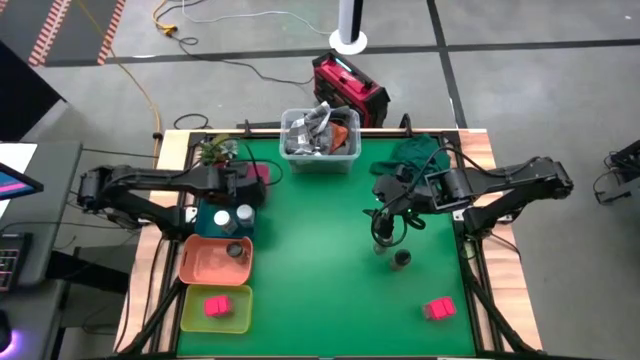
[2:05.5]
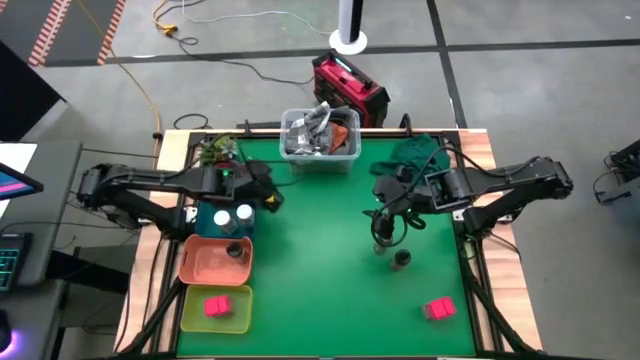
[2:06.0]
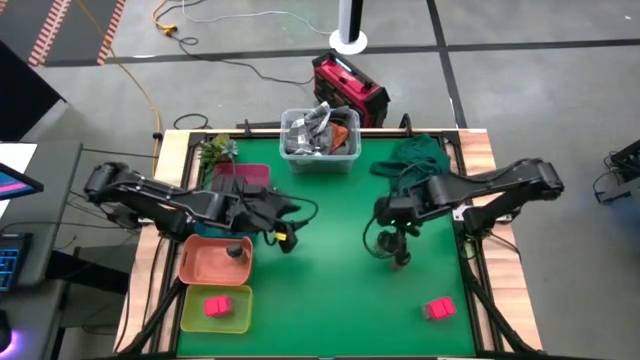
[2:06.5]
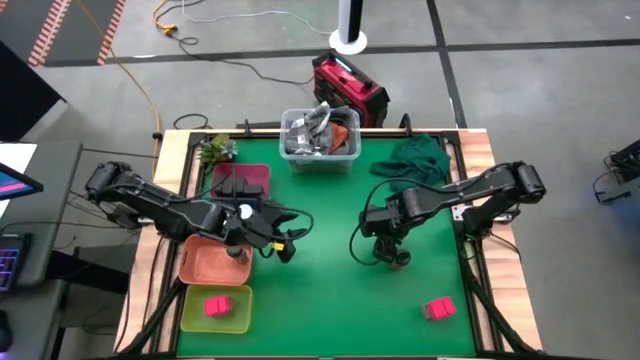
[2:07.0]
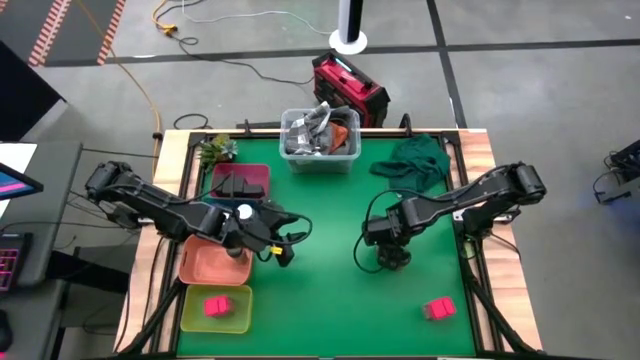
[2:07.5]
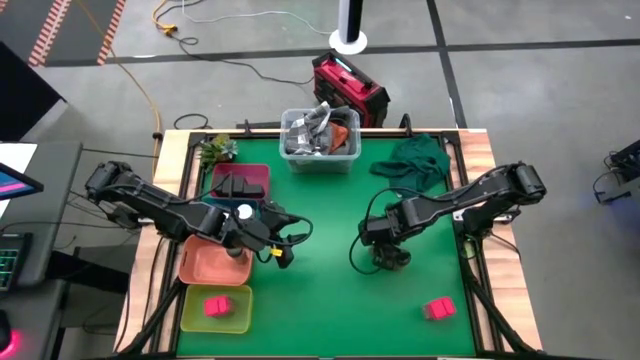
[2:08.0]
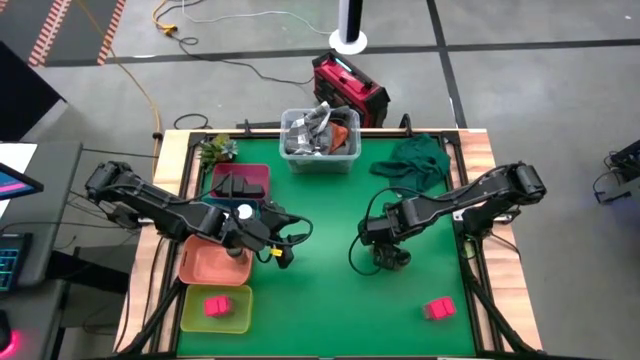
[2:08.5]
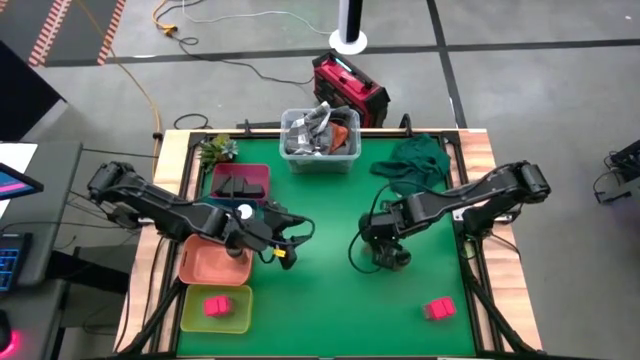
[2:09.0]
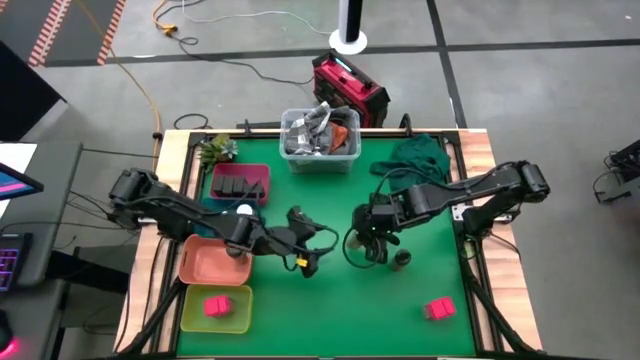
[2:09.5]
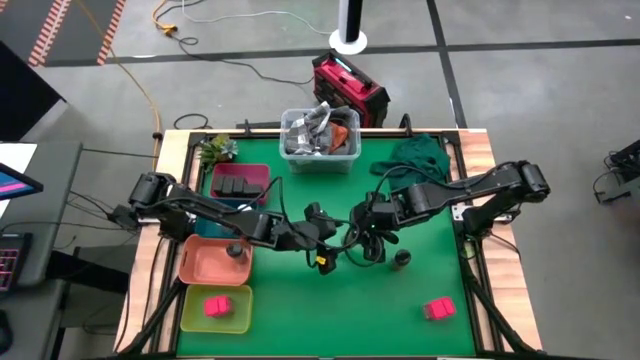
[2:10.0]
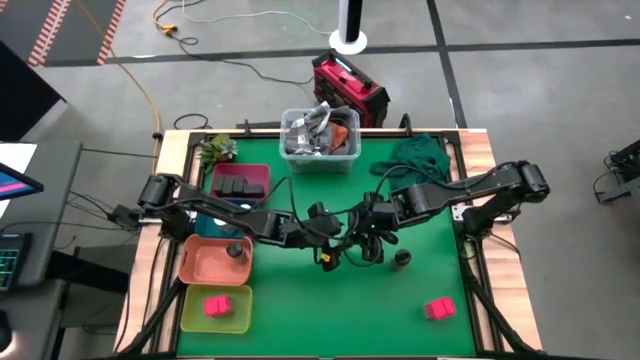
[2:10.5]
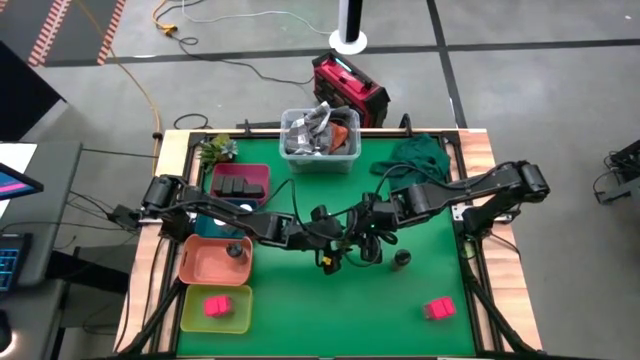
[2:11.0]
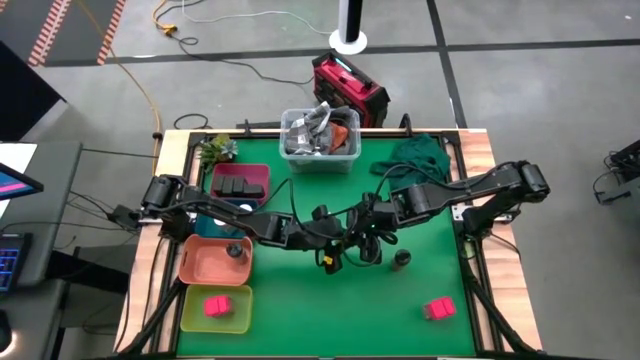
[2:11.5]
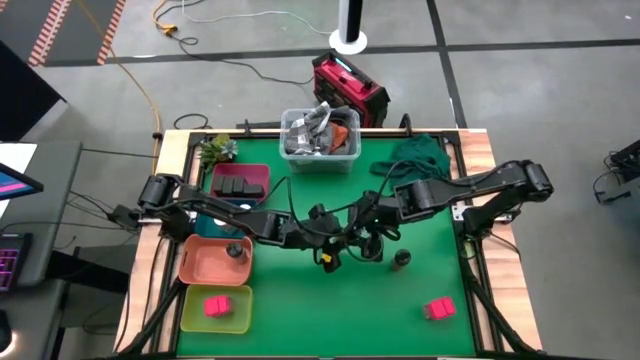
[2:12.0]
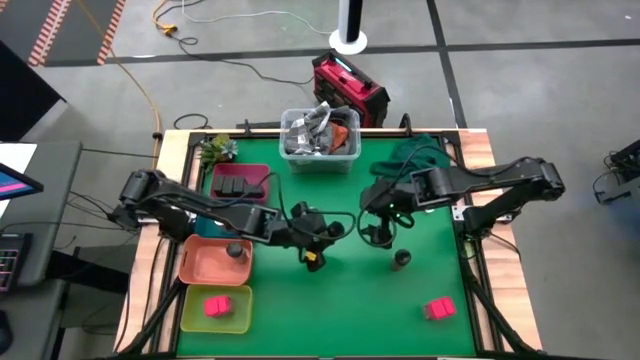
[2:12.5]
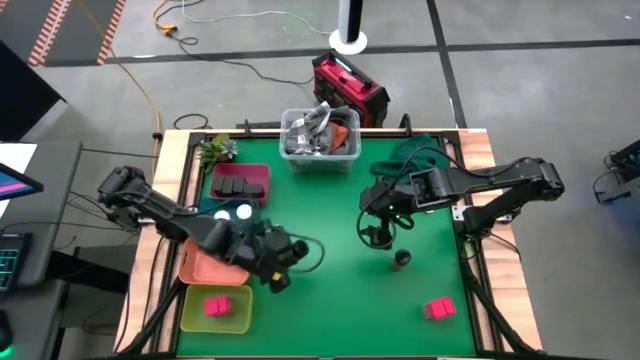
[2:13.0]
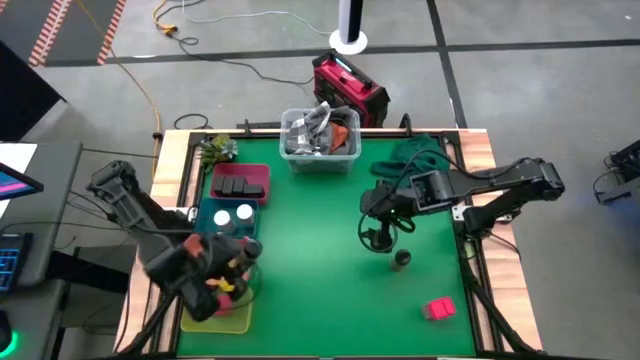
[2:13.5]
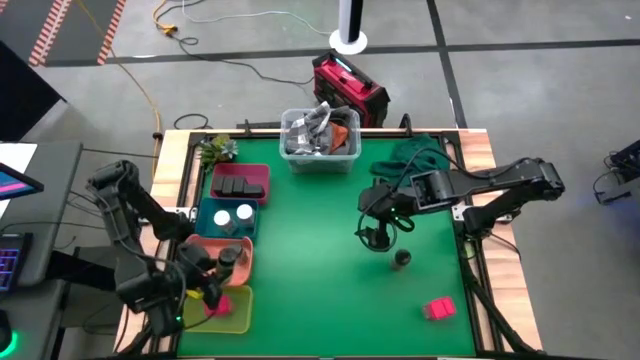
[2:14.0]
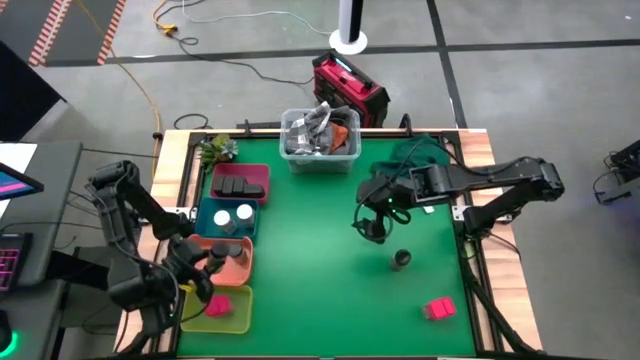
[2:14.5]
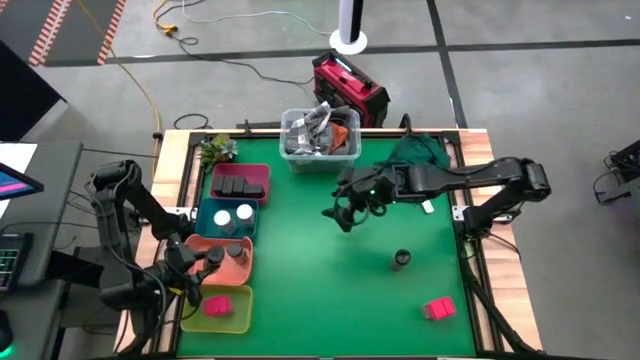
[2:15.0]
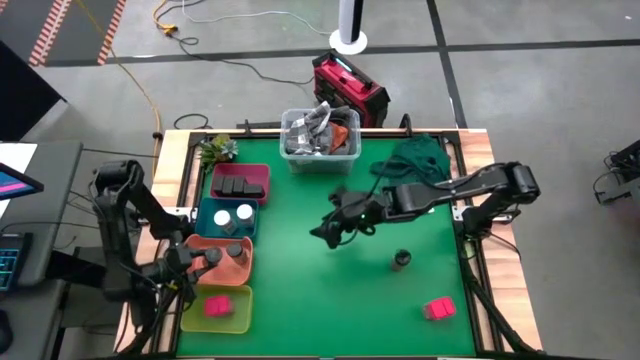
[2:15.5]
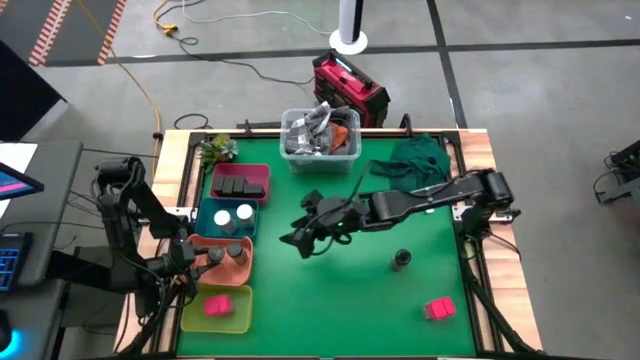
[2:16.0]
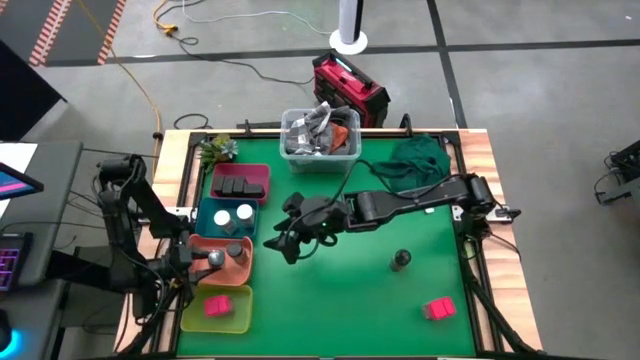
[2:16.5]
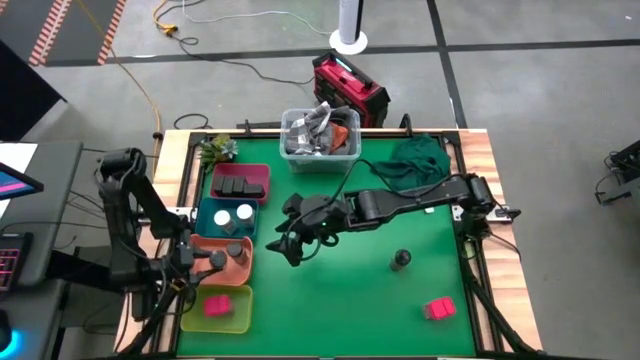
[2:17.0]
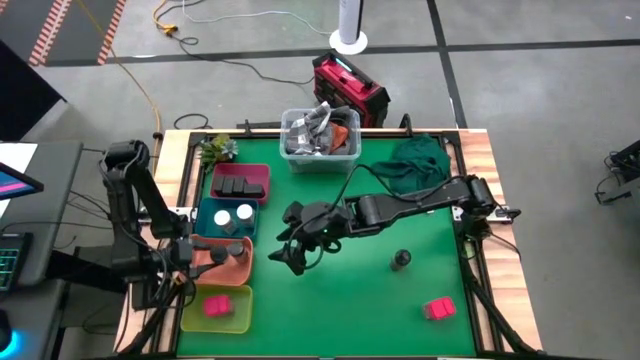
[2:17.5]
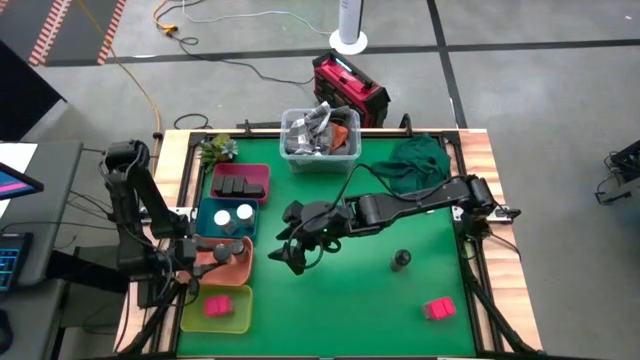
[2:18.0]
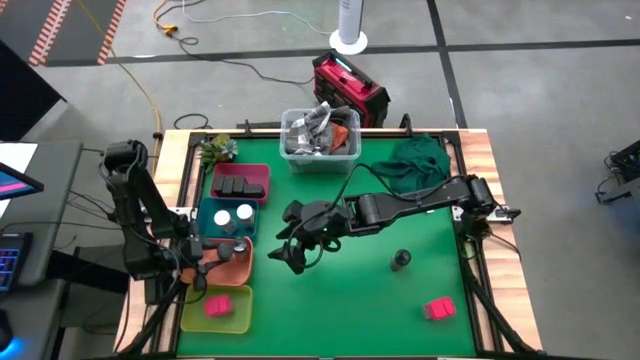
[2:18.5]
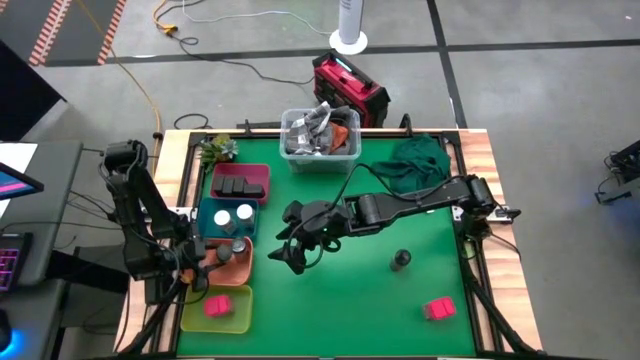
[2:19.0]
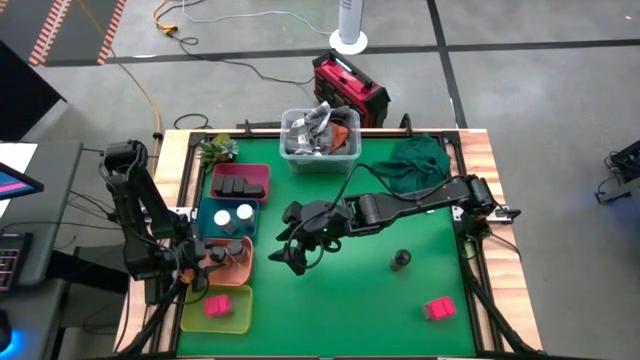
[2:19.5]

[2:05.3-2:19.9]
Task: Sort spices by type
Put the top black seasoning bottle into the orange bin

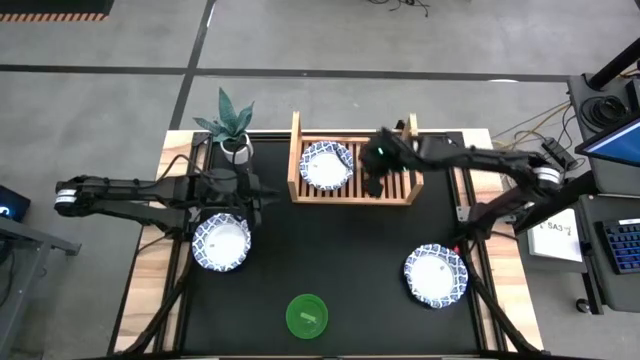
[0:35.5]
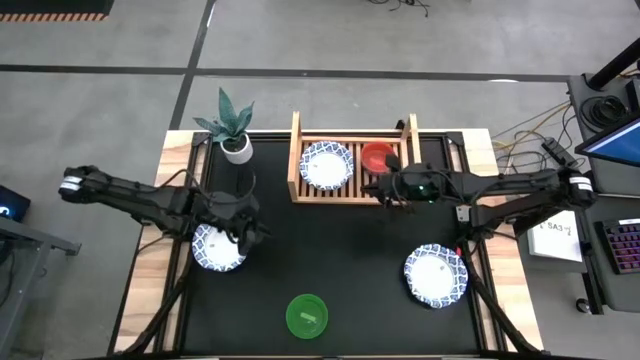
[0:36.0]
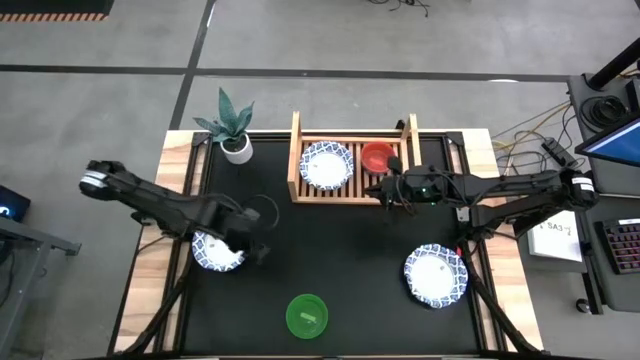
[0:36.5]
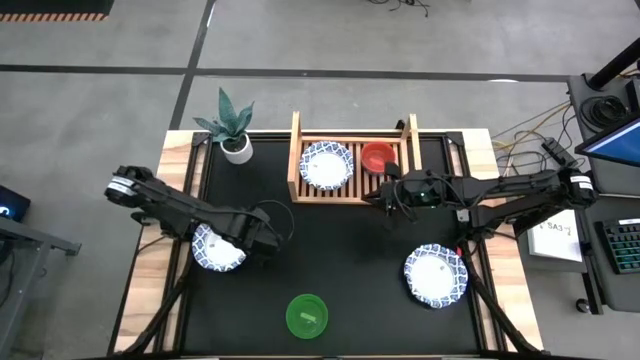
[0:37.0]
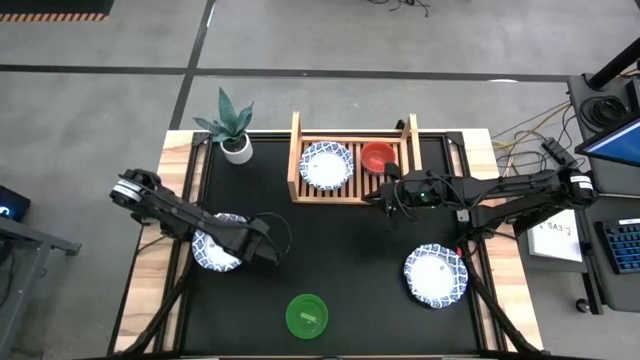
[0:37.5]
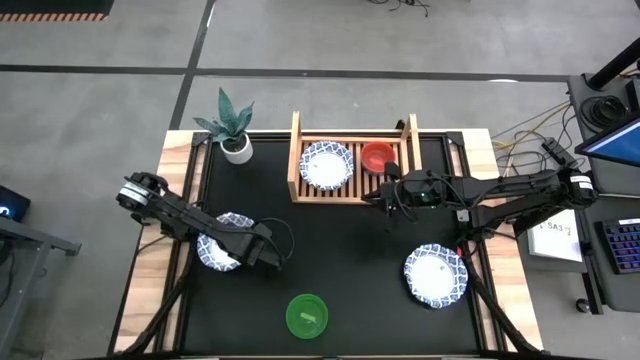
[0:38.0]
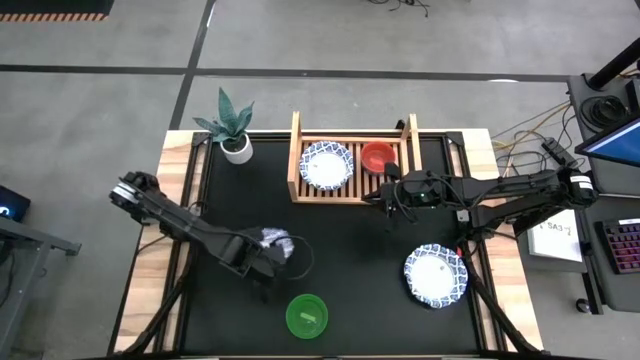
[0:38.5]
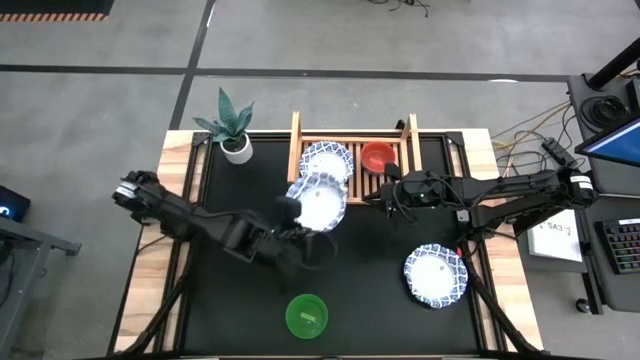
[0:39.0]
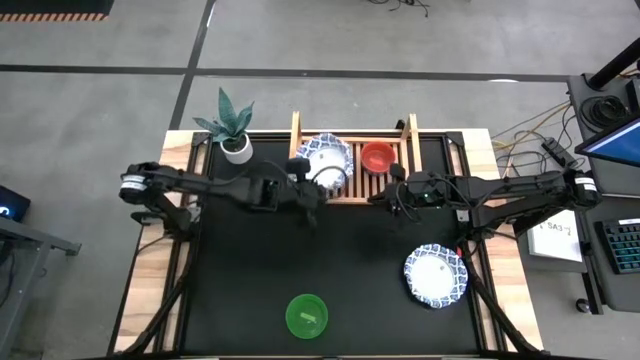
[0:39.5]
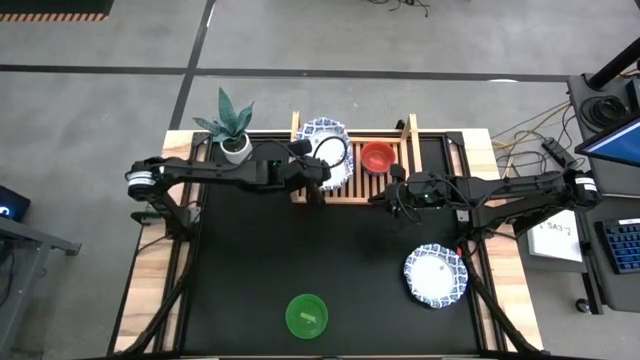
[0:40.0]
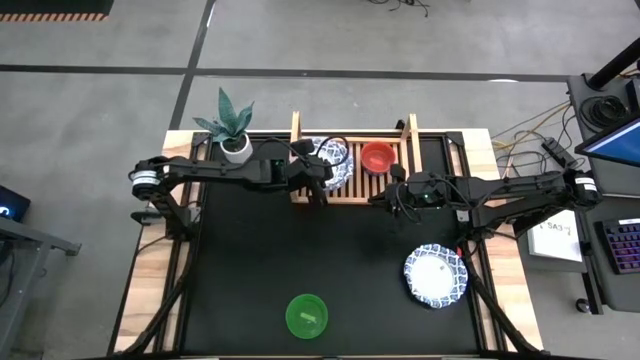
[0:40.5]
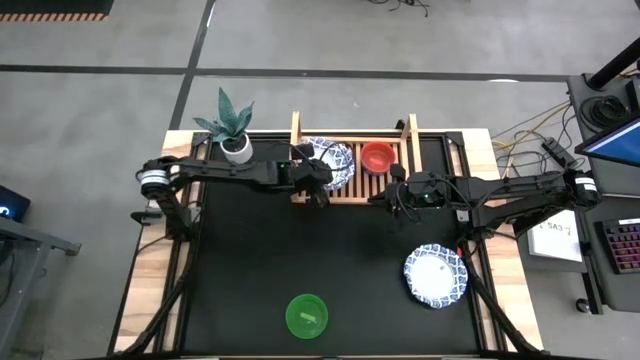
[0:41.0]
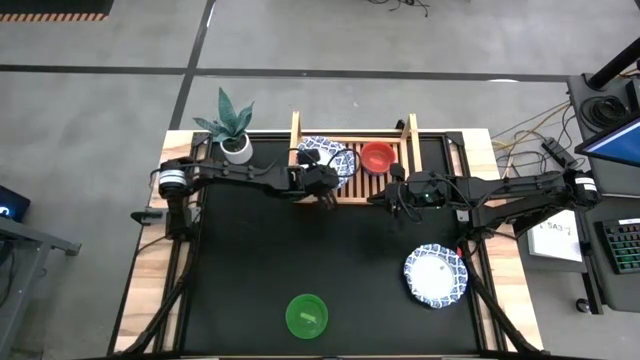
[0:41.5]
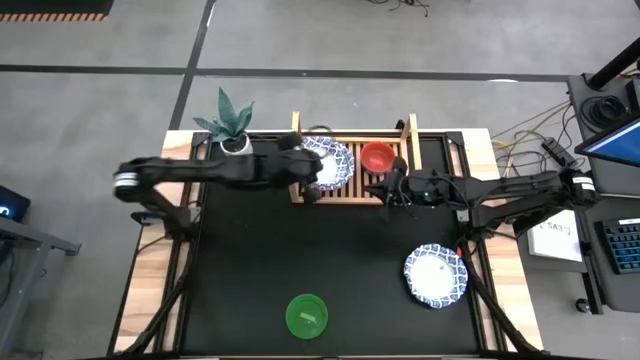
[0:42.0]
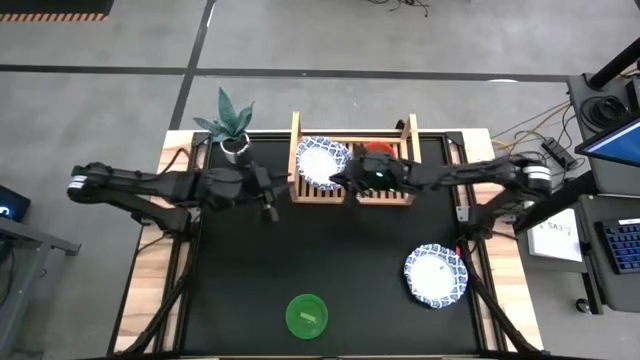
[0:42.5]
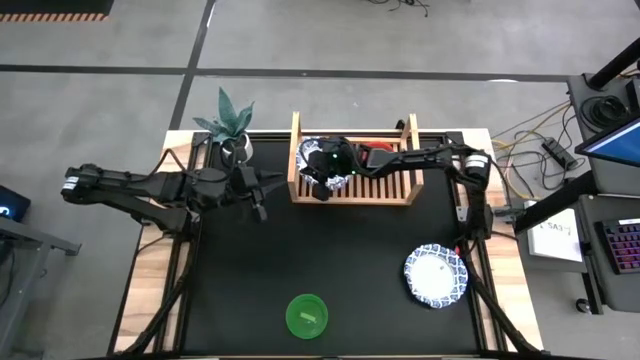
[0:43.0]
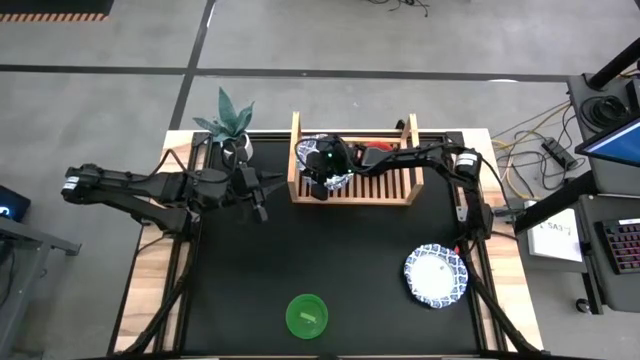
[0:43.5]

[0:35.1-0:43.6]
Task: Place and stack bowls onto a shelf
Stack the blue patterned bowl on top of the blue patterned bowl on the shelf
